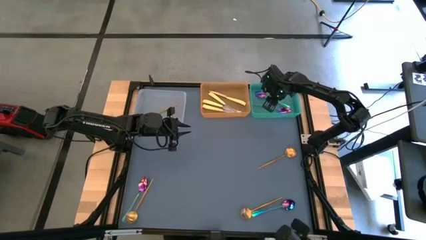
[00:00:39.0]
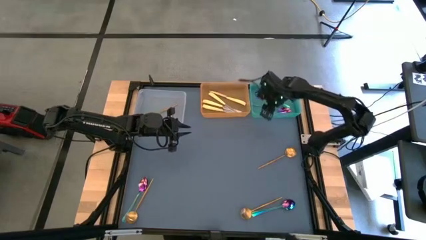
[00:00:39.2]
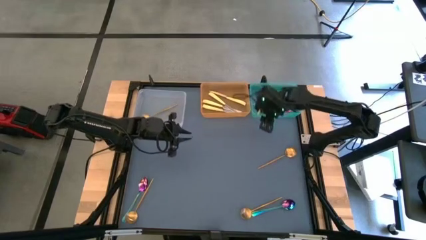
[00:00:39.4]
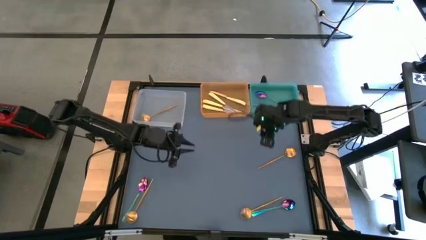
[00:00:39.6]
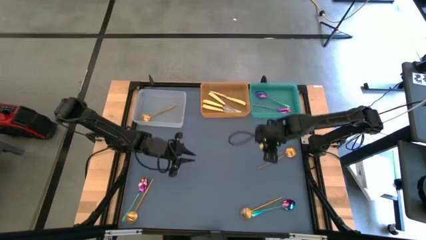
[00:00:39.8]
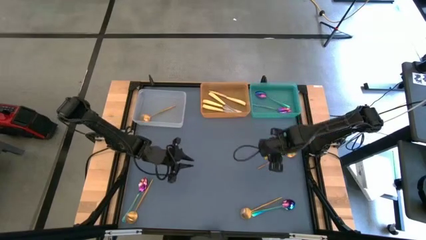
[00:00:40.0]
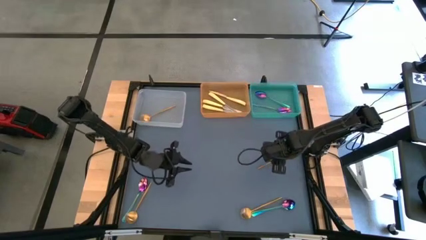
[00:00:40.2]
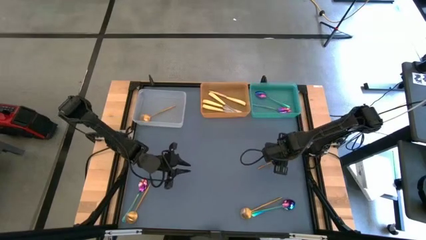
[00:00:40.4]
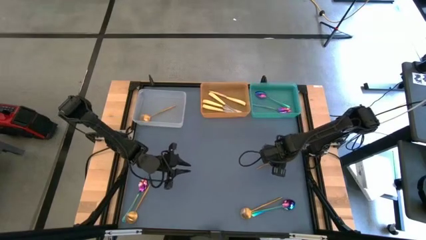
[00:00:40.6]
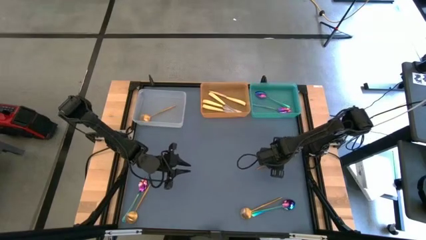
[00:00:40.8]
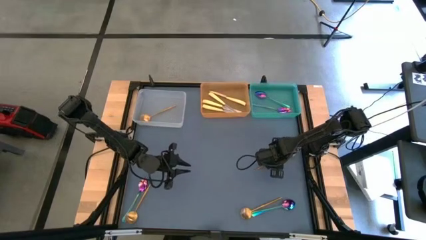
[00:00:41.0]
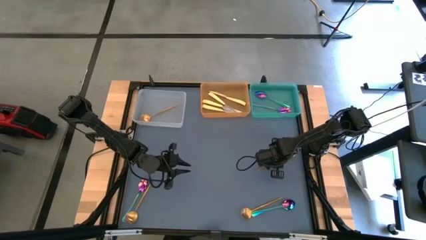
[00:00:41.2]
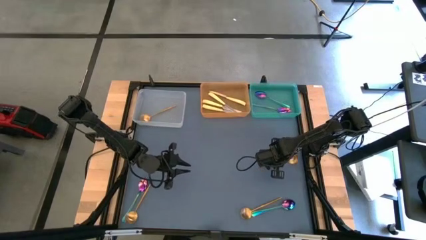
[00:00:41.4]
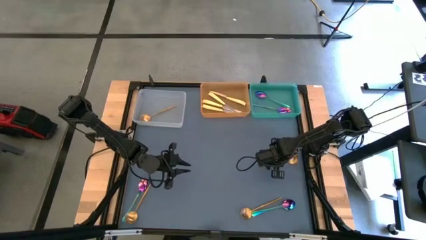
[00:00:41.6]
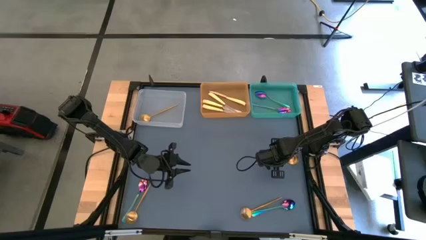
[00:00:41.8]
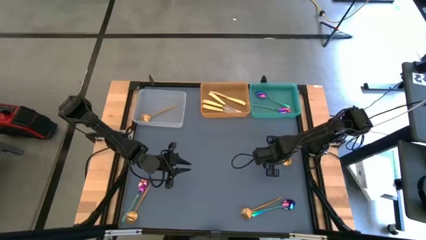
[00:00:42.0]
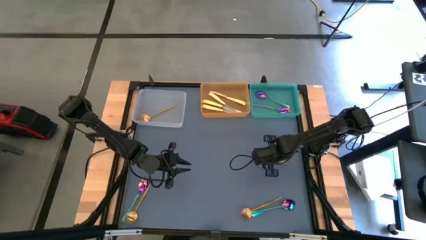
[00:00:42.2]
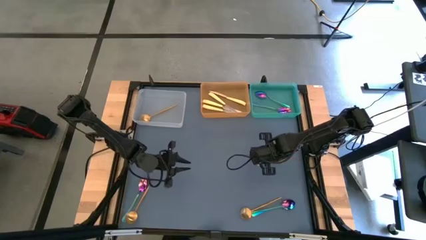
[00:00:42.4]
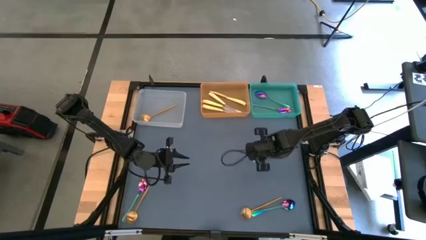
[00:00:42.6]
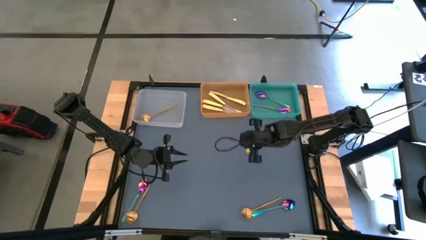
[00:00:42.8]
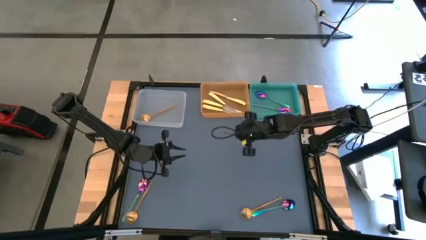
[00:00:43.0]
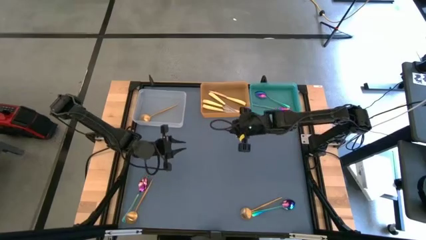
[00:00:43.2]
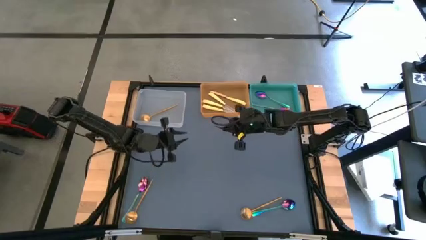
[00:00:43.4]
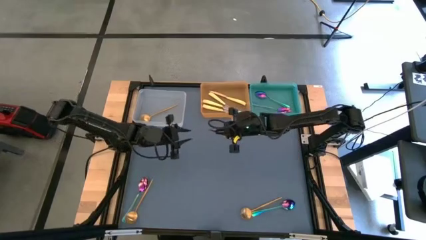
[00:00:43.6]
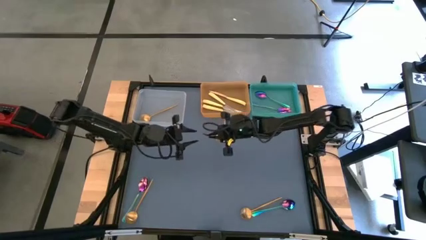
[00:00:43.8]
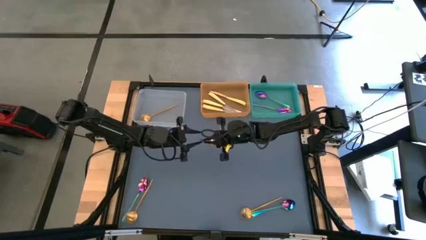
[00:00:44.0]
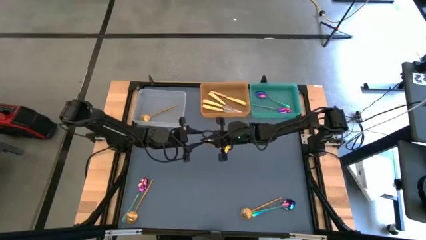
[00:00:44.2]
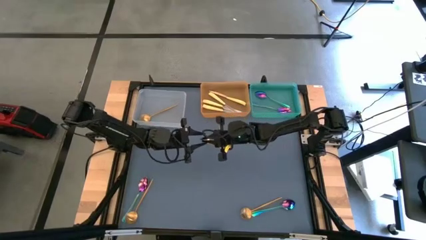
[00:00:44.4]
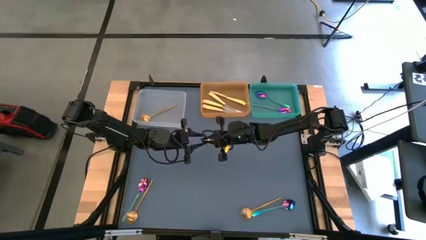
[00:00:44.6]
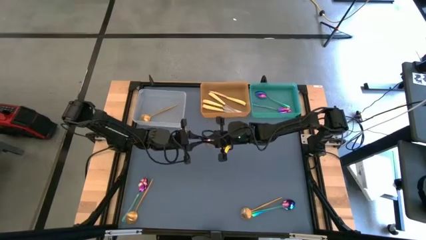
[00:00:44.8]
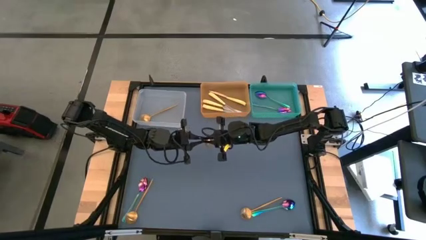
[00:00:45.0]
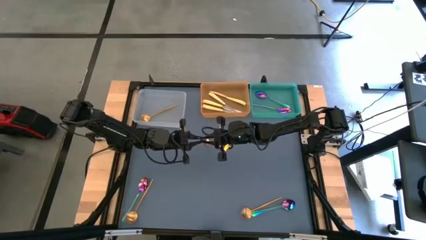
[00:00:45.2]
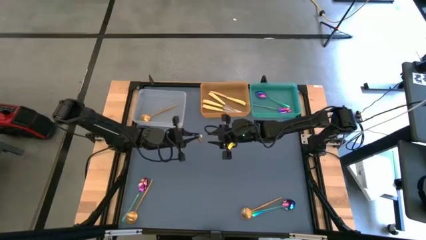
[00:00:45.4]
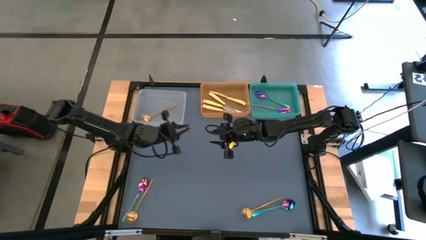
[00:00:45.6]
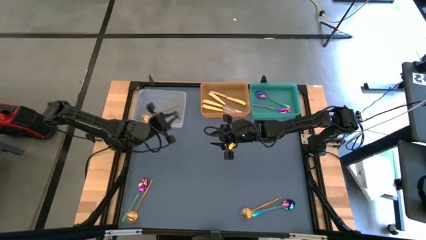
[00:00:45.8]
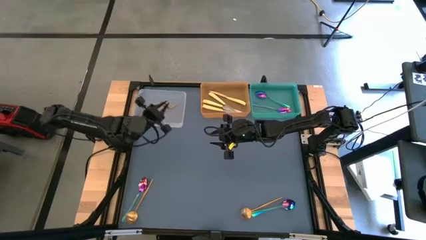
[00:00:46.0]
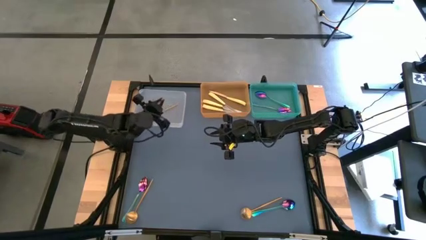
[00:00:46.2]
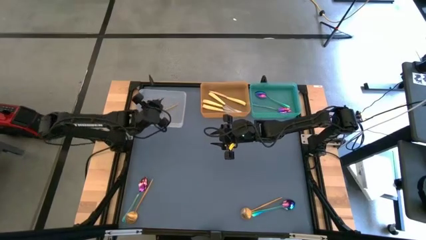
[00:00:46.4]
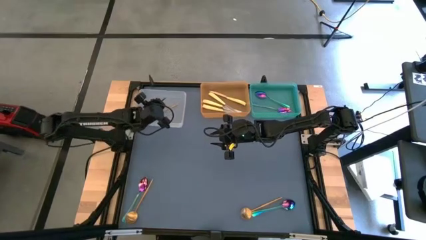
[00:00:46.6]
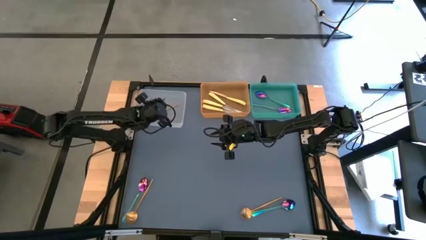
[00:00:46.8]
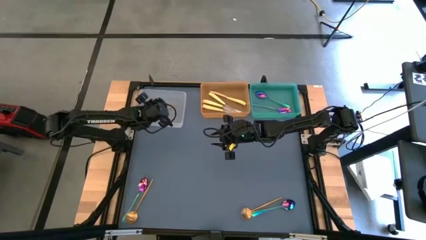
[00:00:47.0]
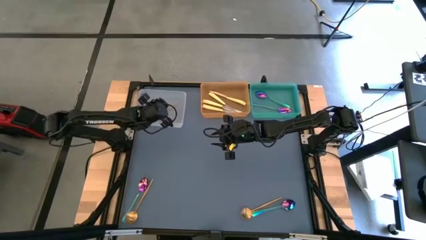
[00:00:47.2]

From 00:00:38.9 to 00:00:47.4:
Task: Sort silverware by color (type)
Put the gold spoon into the white bin

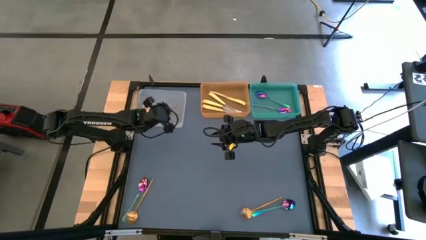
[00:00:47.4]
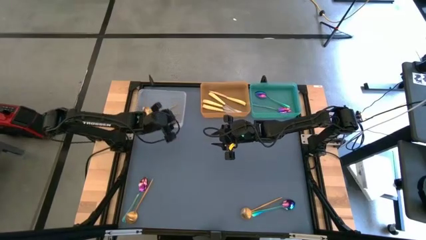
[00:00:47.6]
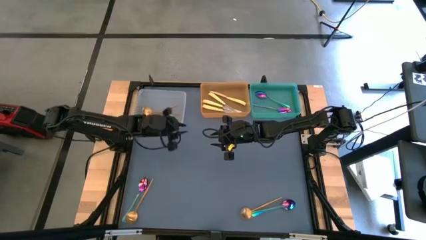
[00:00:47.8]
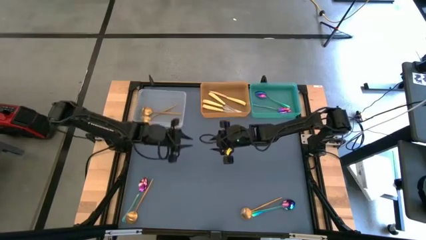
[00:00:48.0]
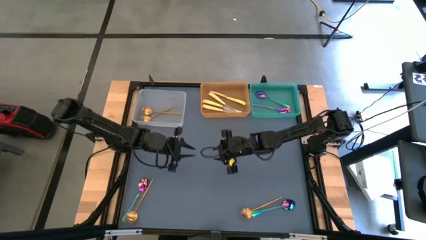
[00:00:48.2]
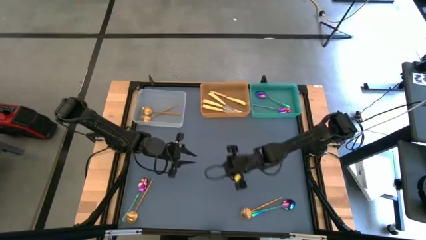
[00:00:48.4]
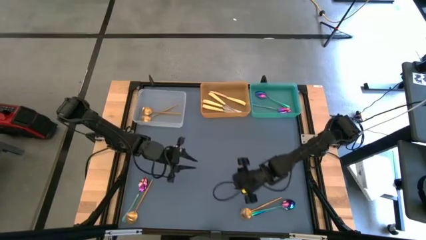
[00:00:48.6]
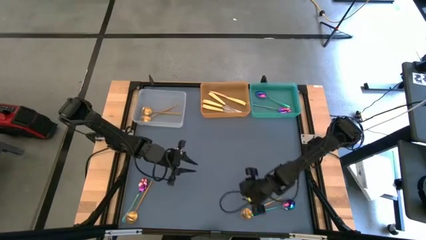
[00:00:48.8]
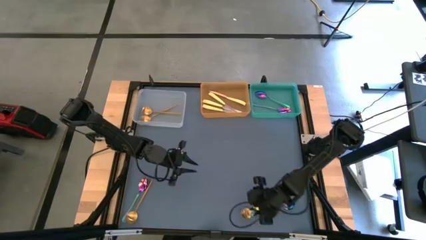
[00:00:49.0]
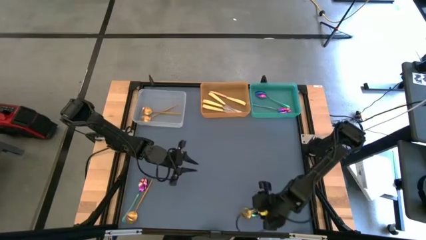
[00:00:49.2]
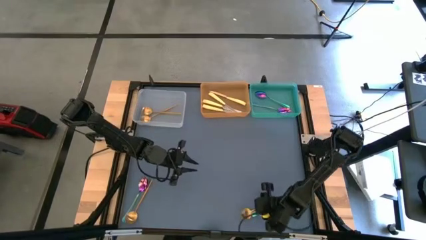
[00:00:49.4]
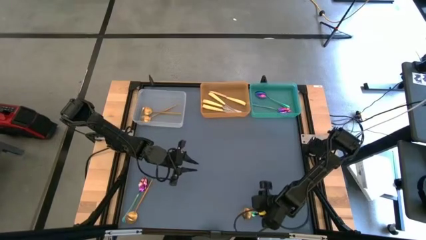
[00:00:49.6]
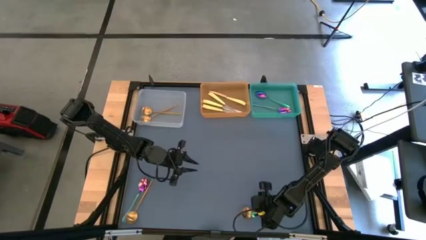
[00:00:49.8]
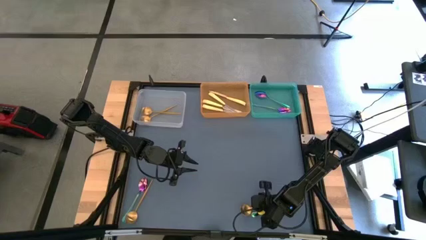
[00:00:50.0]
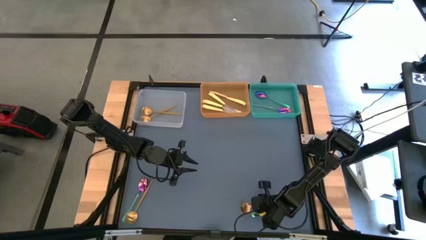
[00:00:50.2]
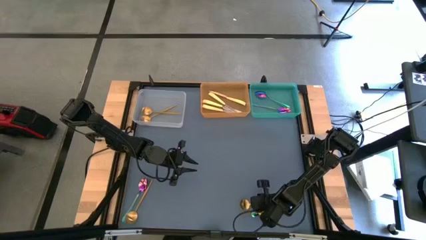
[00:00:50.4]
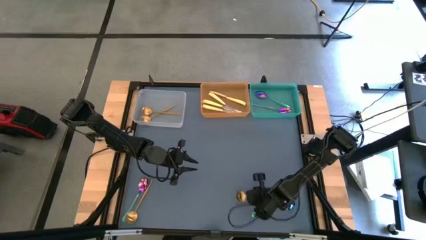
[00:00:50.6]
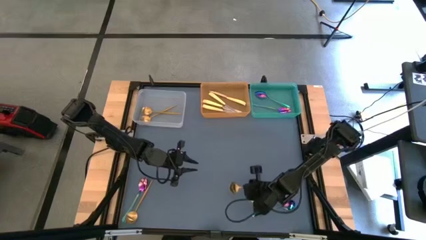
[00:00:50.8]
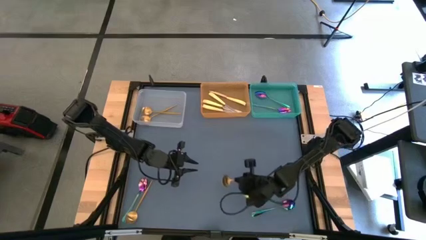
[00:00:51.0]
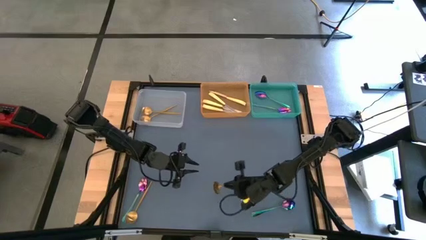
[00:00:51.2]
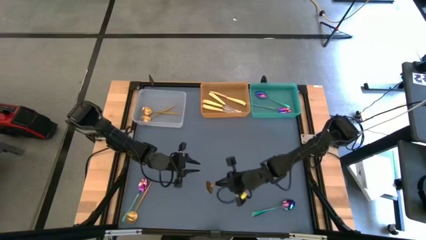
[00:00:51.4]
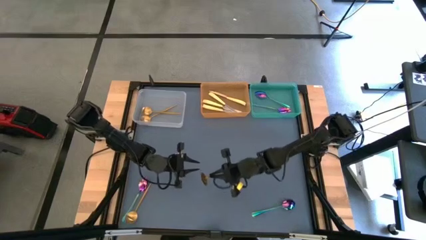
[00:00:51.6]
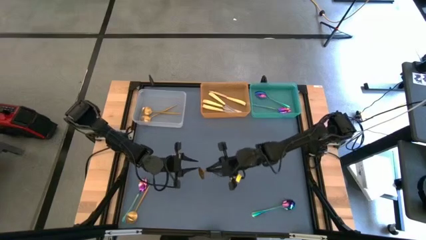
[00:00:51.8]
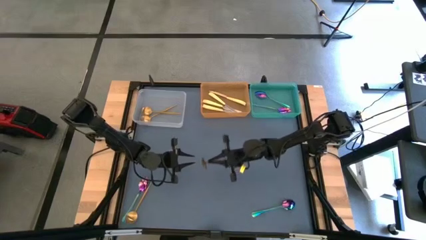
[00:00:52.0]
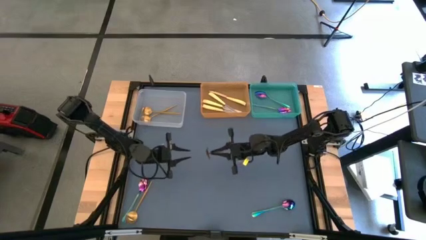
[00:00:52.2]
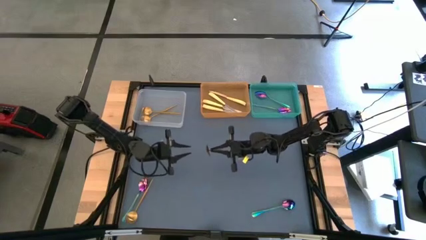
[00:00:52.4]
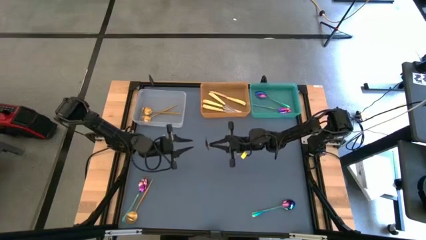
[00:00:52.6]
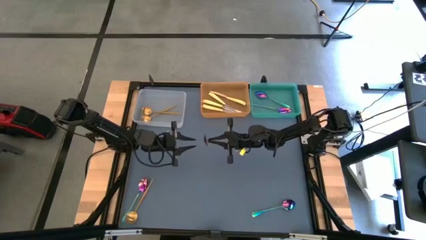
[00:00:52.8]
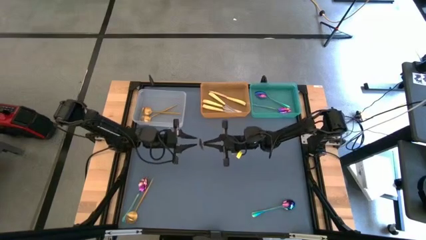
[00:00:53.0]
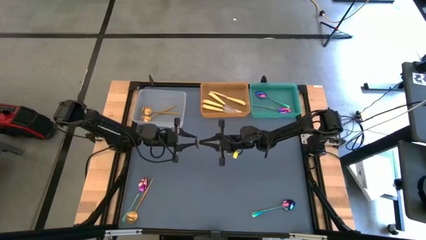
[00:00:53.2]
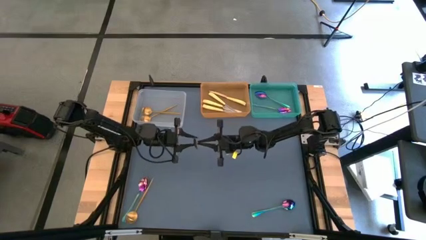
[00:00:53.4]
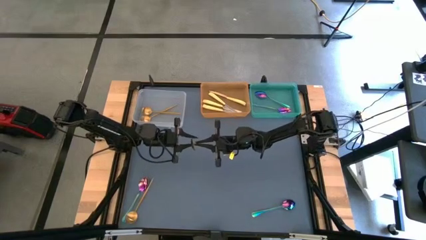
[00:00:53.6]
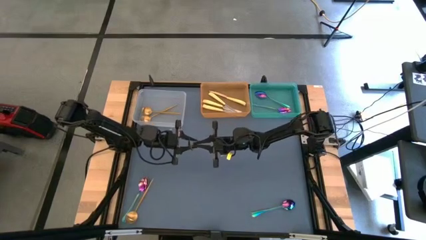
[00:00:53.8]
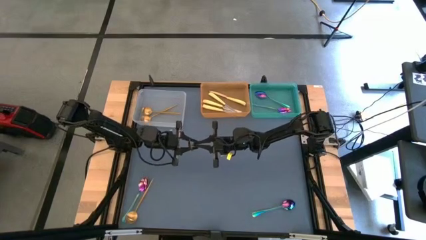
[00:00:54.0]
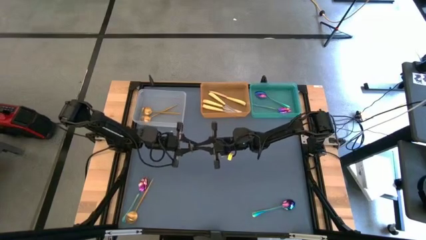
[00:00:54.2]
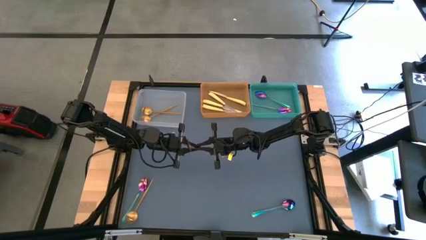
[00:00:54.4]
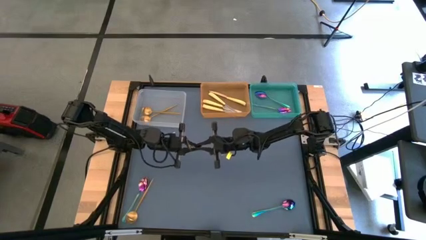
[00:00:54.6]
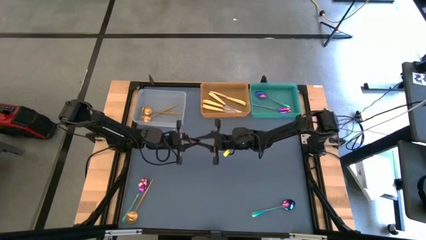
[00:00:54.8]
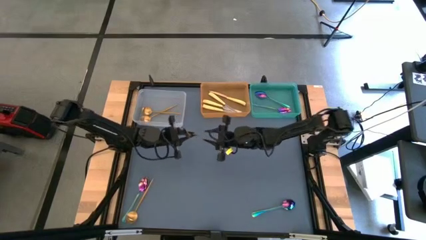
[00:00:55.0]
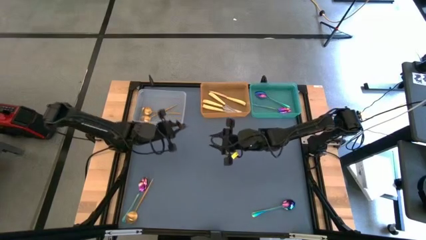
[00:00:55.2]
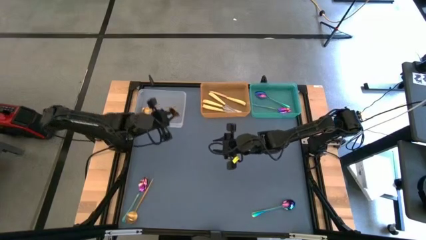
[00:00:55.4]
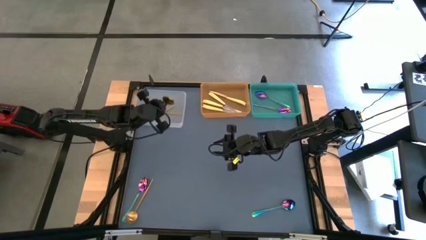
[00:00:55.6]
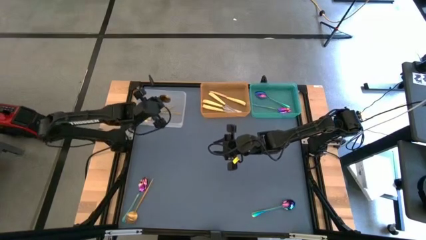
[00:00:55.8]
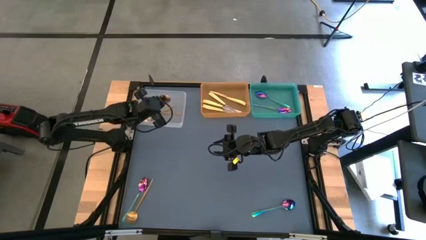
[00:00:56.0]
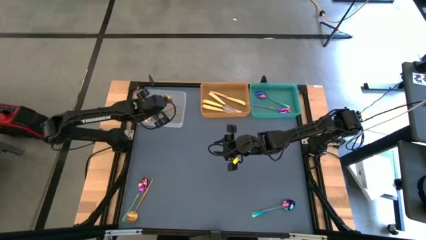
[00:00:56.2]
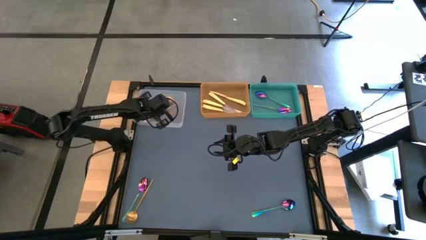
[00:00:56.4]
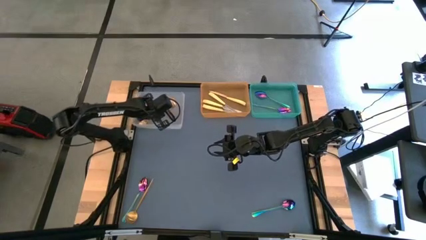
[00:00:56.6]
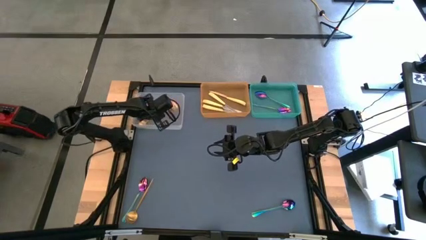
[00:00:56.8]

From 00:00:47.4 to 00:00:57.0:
Put the gold spoon into the white bin
